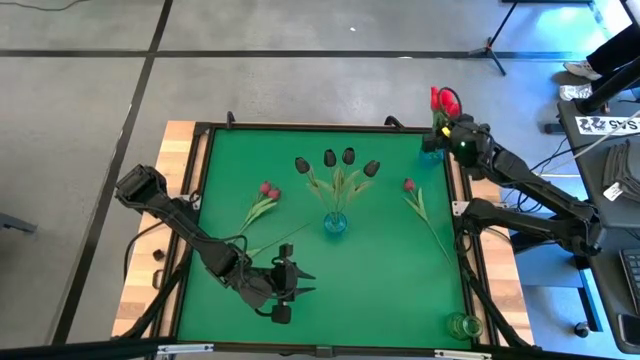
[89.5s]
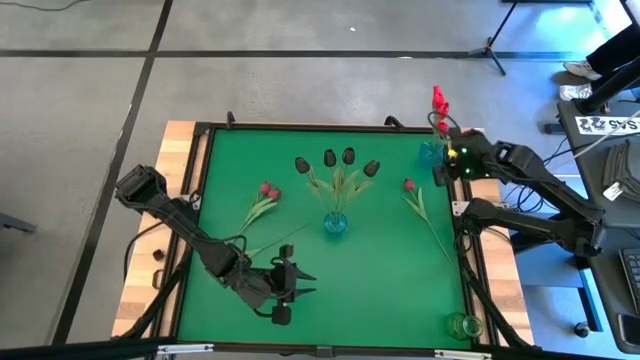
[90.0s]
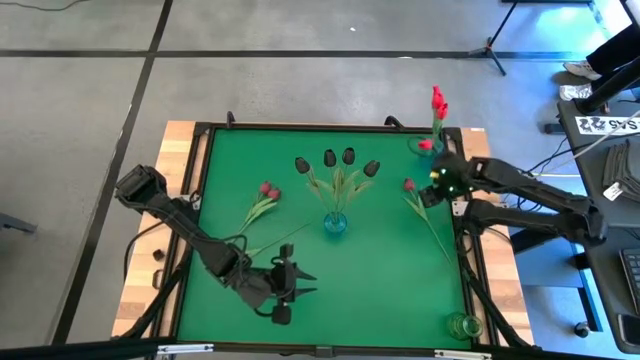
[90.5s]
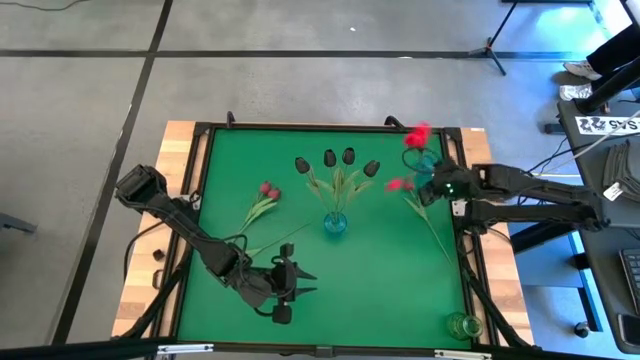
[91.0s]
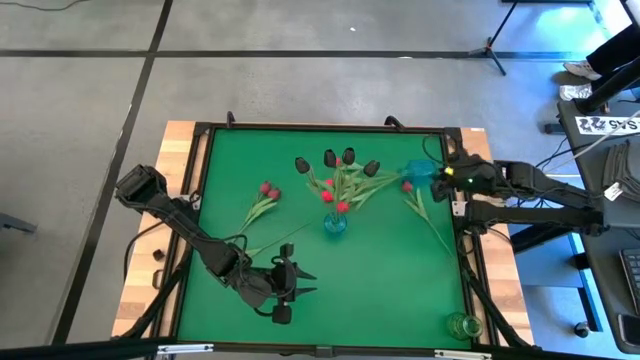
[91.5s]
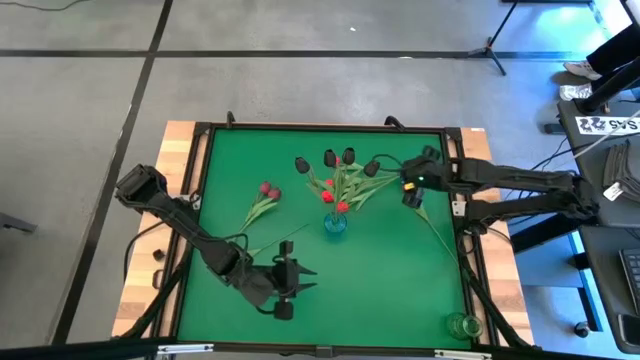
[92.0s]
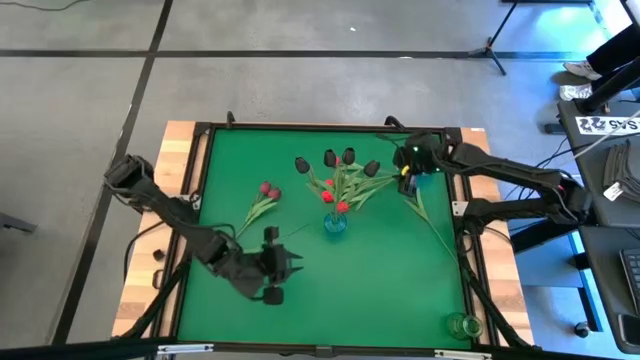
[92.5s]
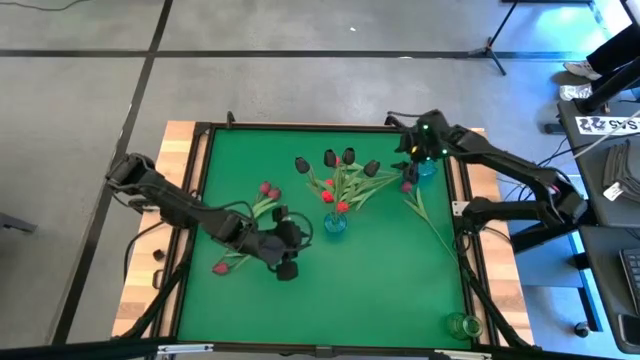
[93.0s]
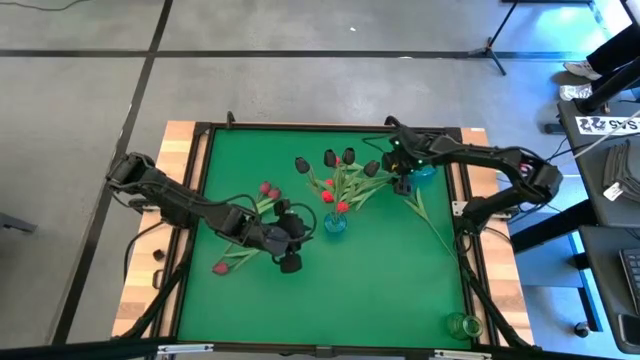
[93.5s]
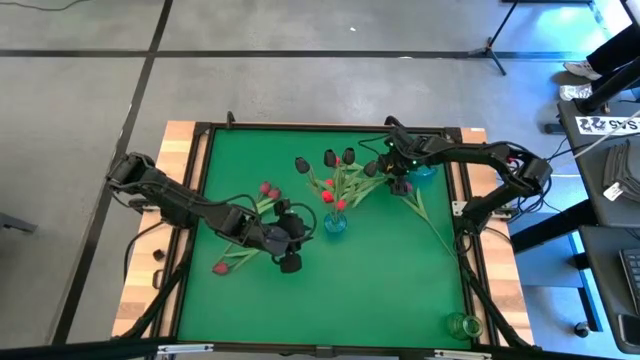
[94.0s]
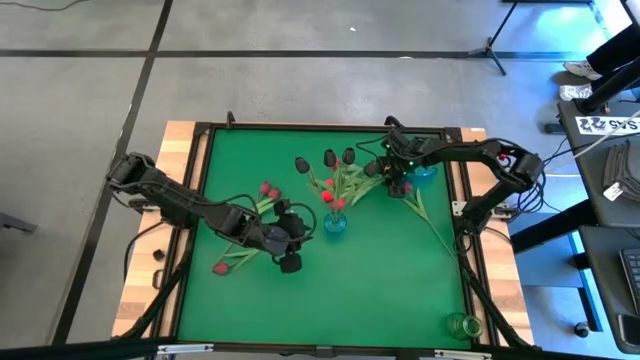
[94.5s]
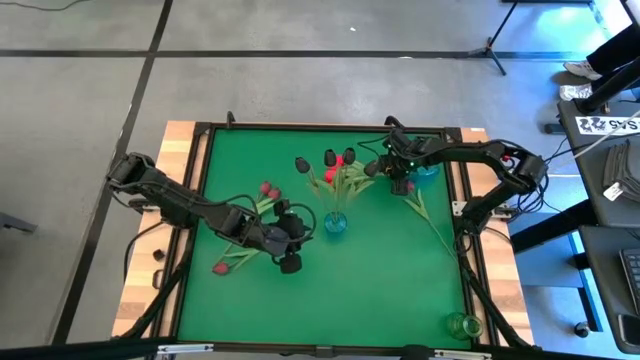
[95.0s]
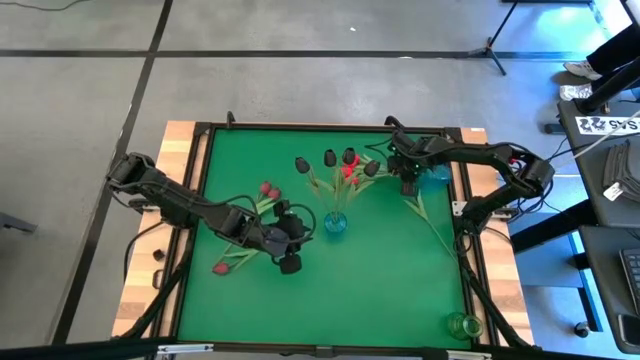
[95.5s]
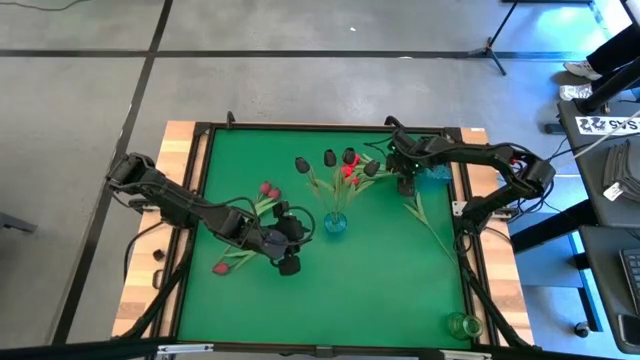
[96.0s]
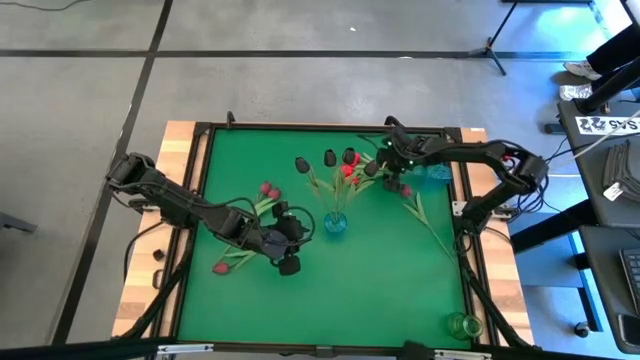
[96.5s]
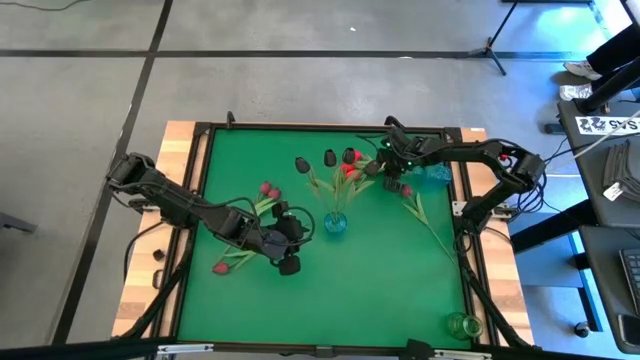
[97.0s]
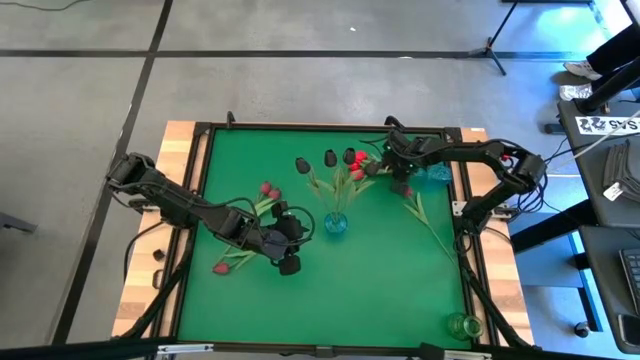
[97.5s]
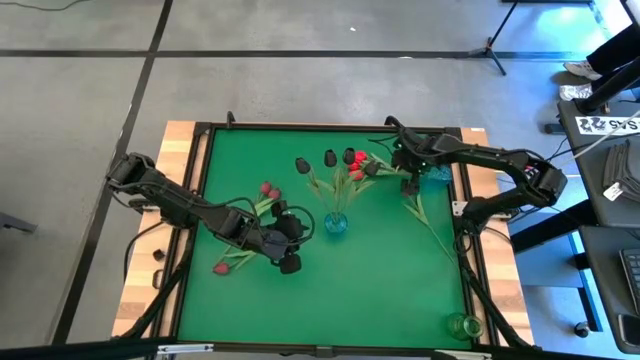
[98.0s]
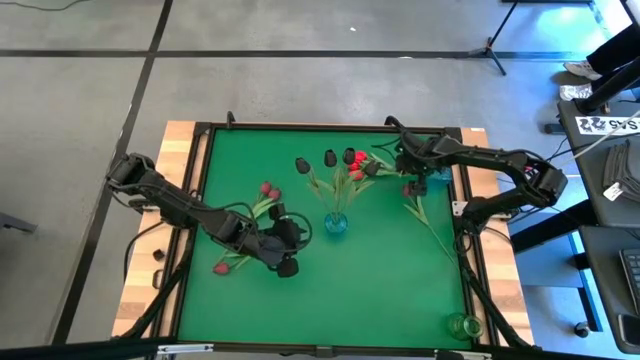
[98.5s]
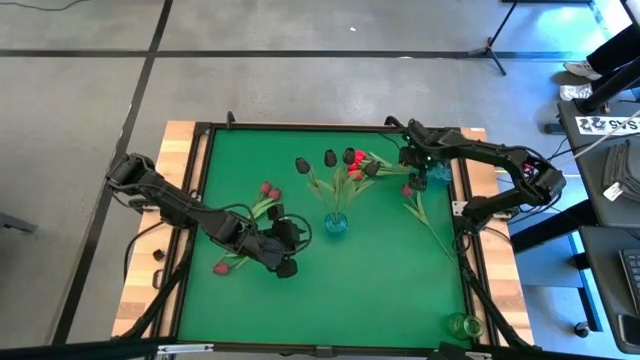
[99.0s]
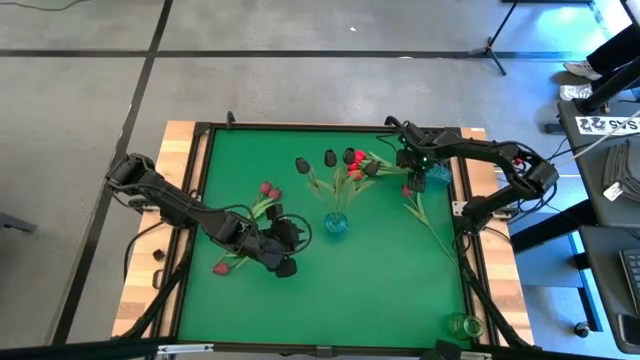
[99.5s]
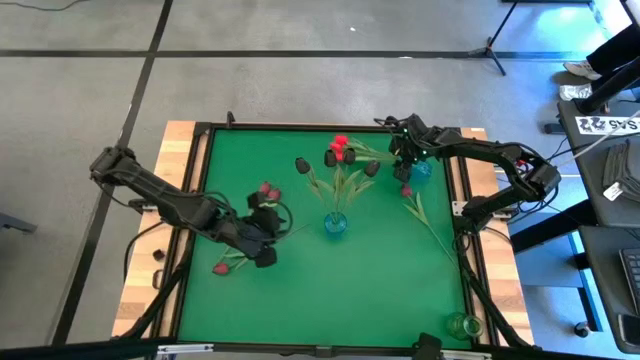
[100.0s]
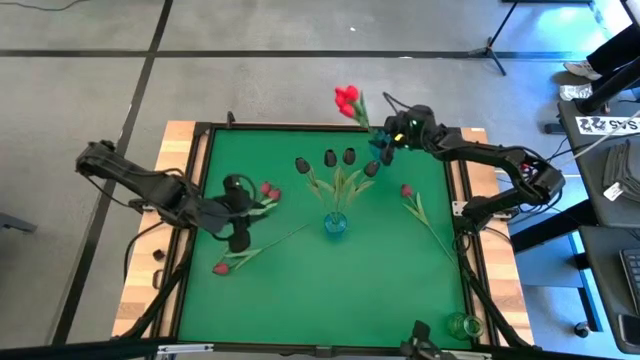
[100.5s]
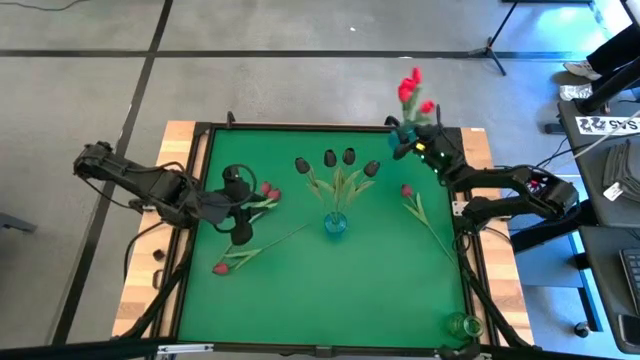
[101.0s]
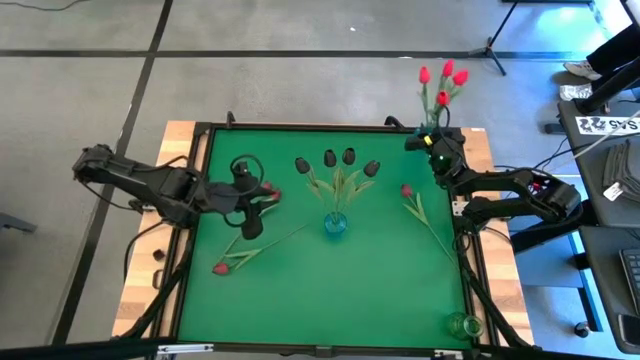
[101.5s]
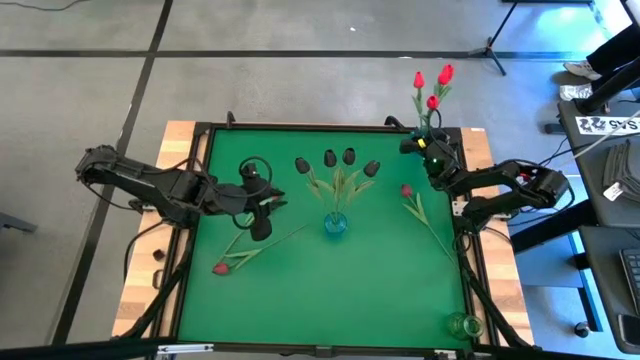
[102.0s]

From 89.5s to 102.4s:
Task: Sort flowers into vase by color
Adjust the top blue vase

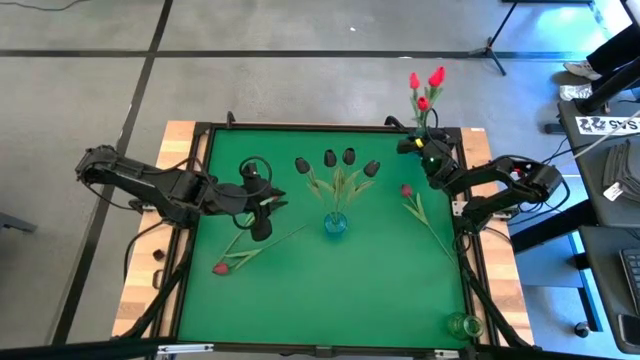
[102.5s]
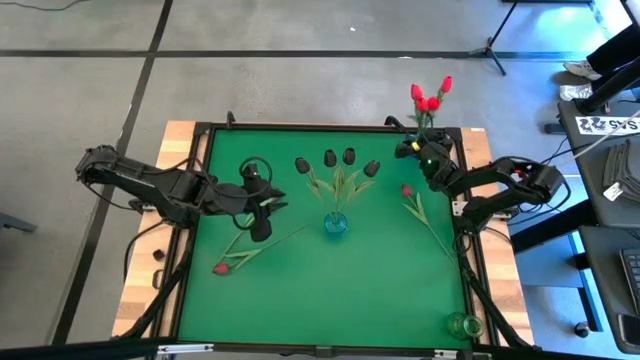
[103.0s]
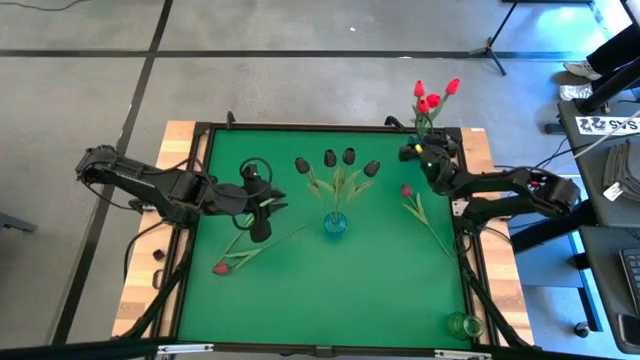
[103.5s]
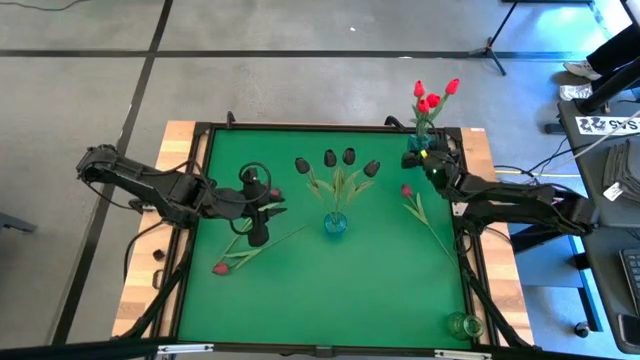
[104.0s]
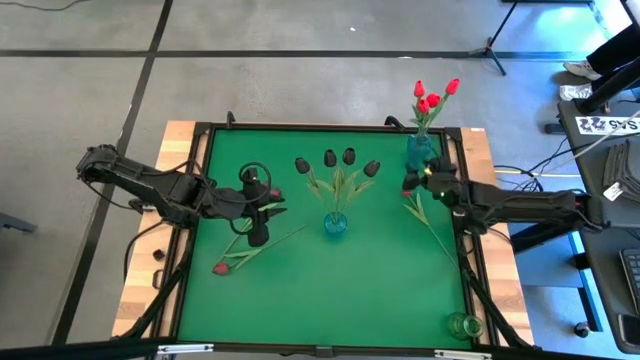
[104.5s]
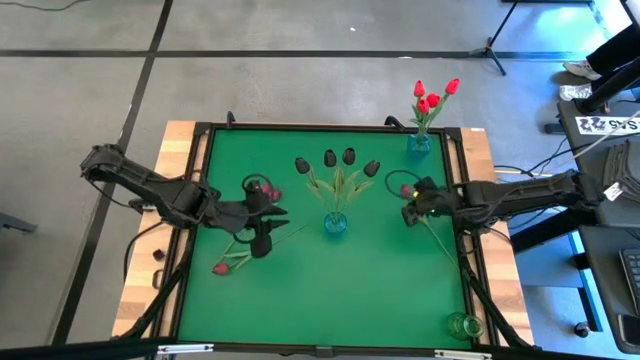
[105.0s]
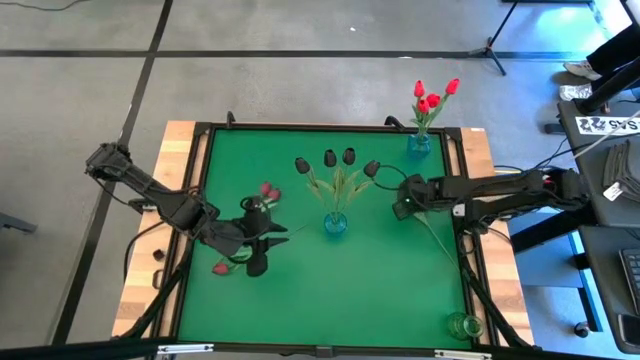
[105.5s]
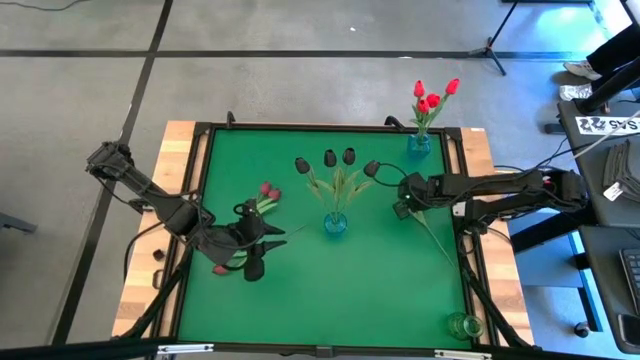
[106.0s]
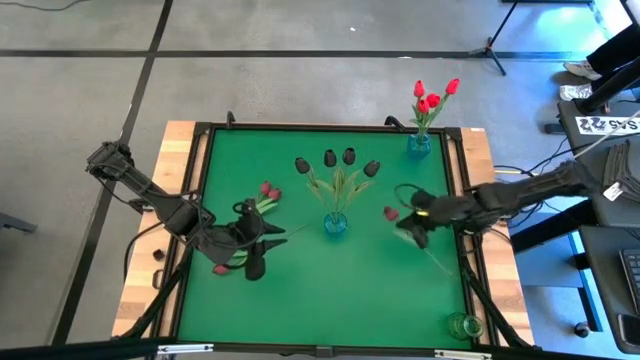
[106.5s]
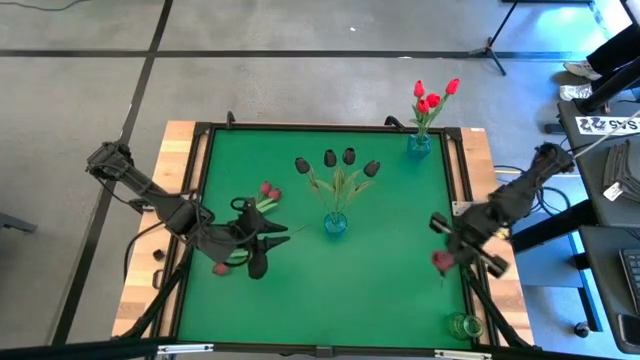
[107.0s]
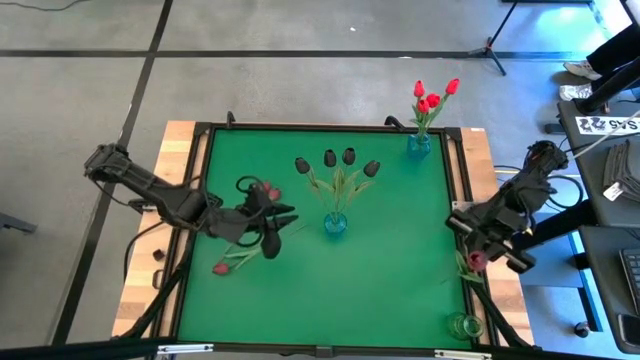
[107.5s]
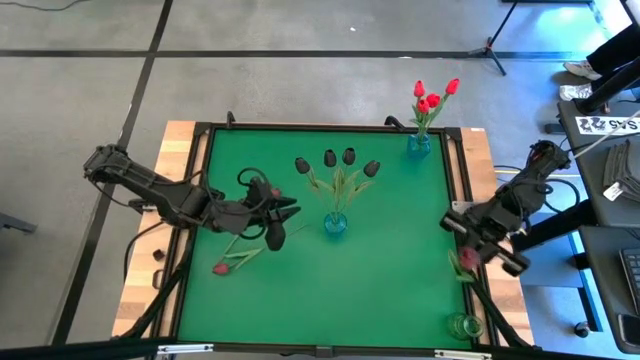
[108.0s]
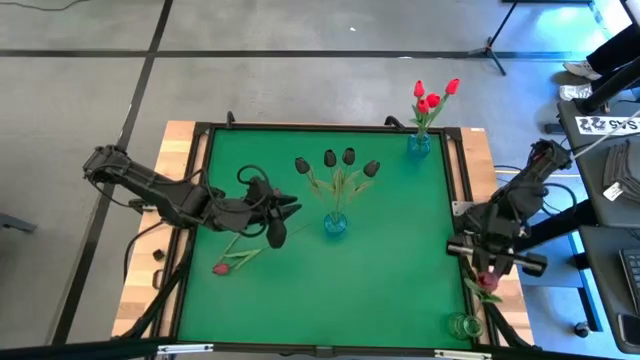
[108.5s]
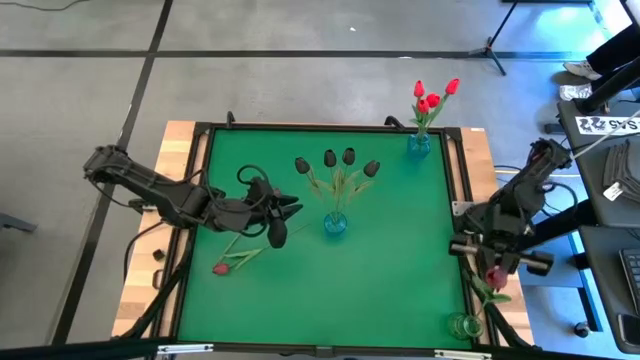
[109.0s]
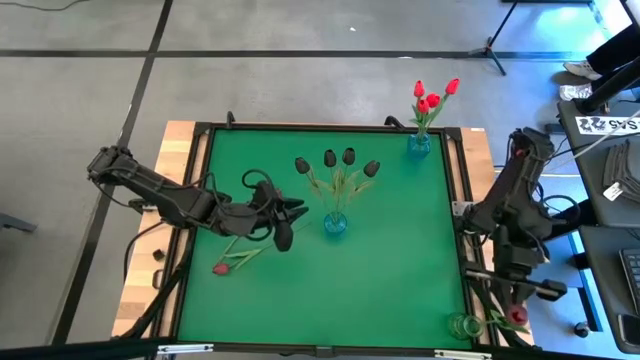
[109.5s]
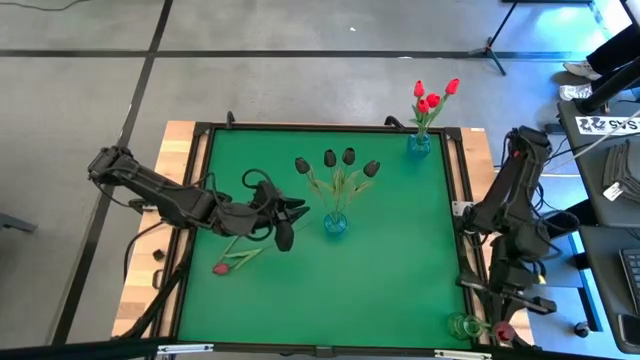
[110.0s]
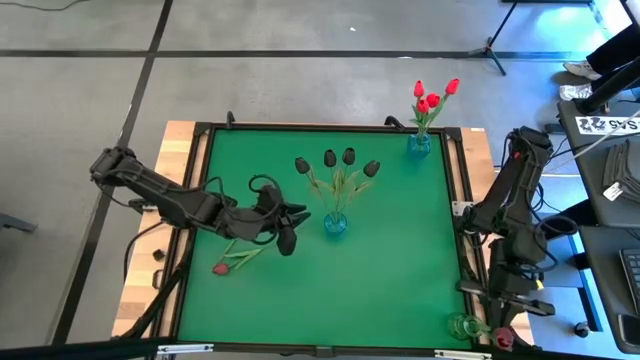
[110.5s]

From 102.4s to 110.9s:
Put the pink tulip into the green vase
